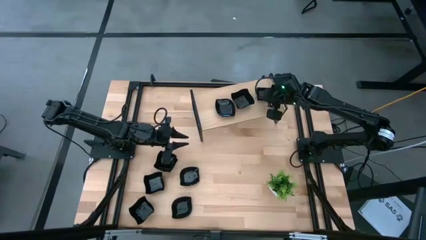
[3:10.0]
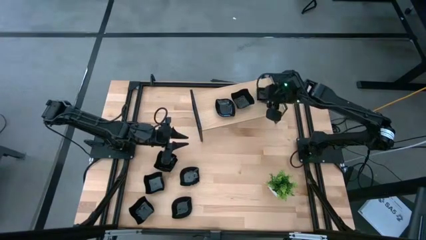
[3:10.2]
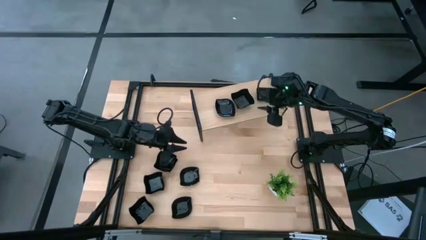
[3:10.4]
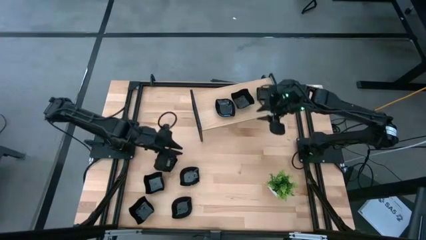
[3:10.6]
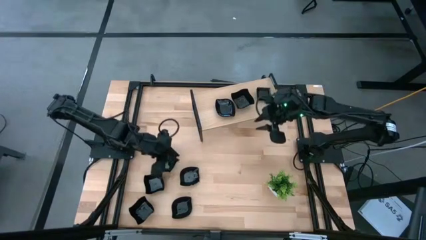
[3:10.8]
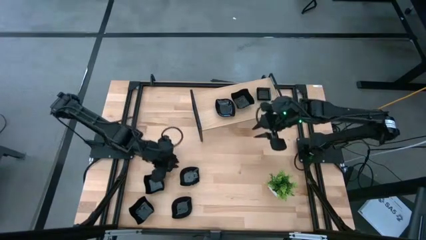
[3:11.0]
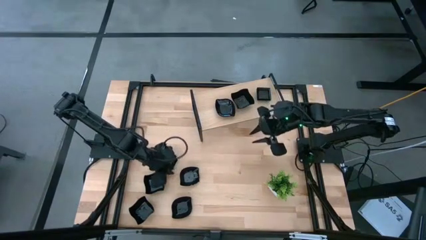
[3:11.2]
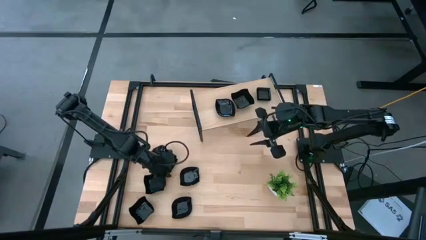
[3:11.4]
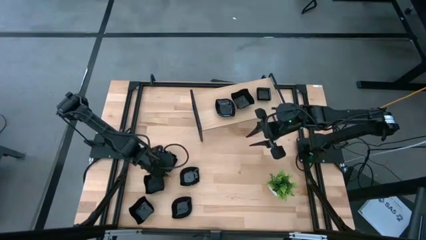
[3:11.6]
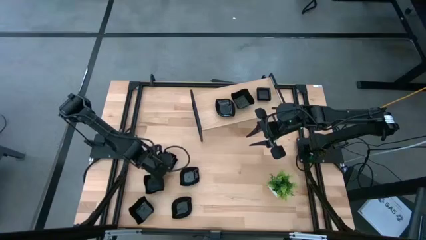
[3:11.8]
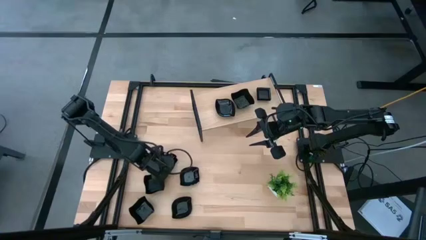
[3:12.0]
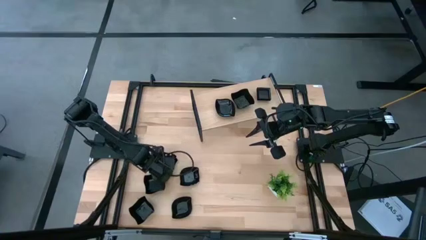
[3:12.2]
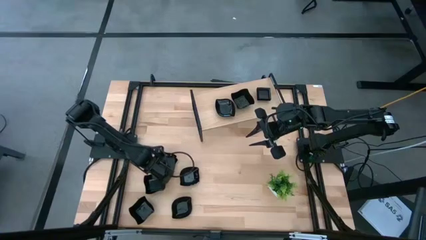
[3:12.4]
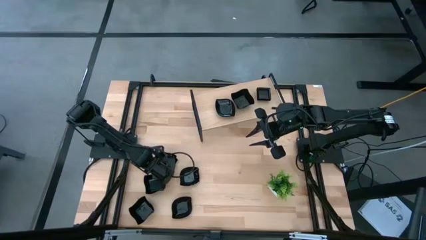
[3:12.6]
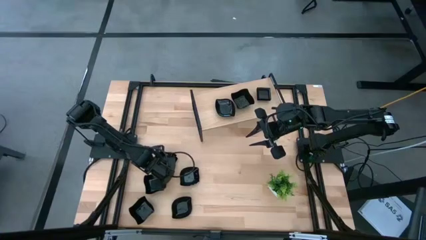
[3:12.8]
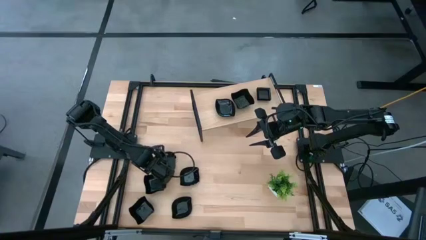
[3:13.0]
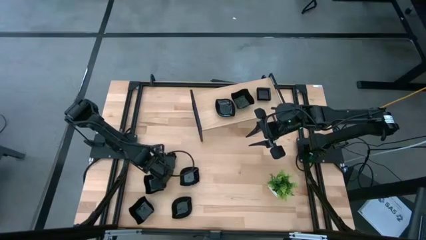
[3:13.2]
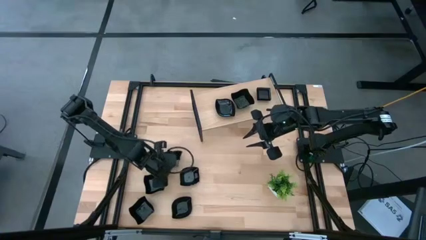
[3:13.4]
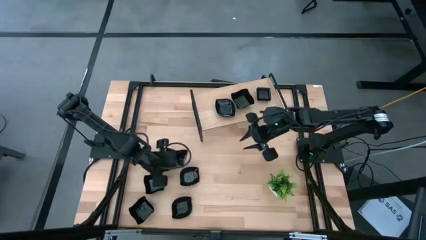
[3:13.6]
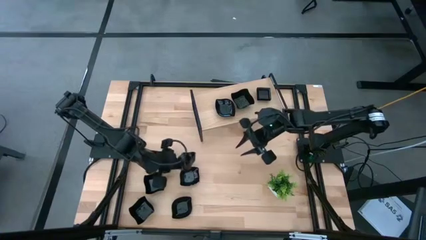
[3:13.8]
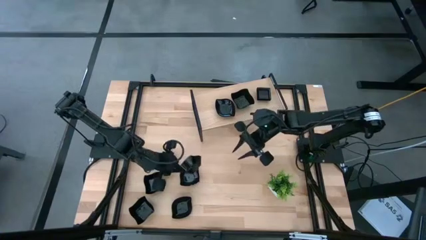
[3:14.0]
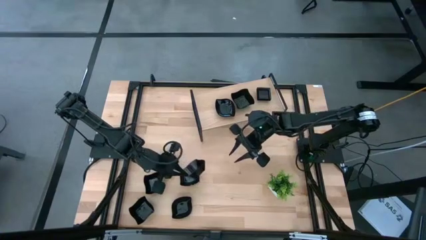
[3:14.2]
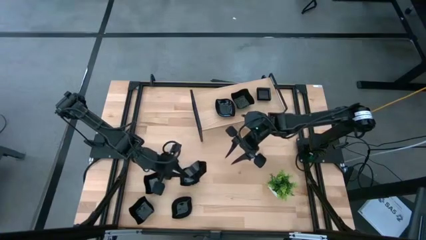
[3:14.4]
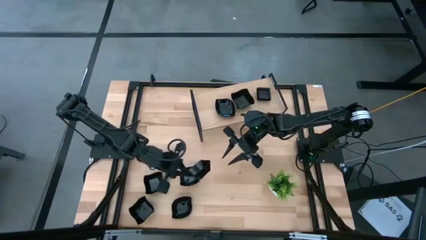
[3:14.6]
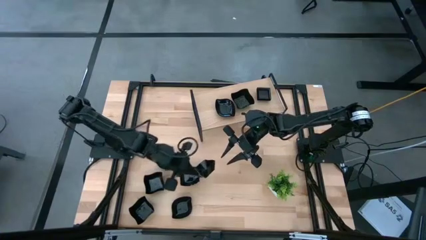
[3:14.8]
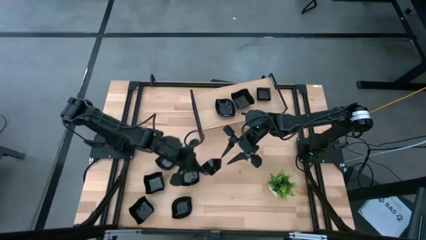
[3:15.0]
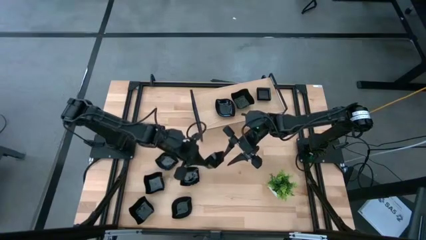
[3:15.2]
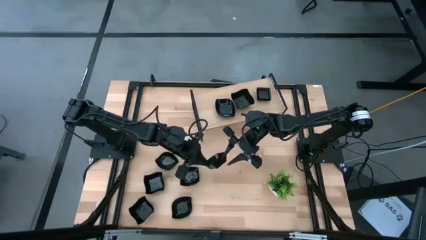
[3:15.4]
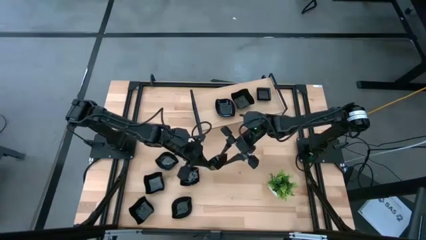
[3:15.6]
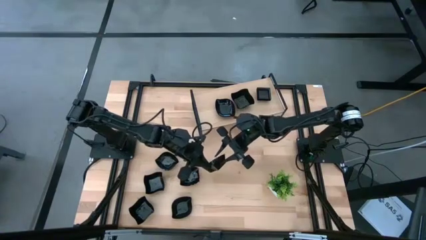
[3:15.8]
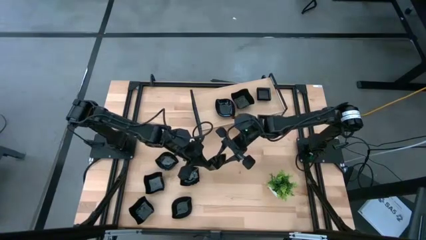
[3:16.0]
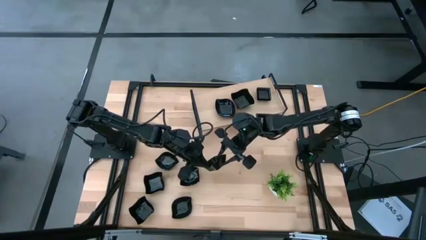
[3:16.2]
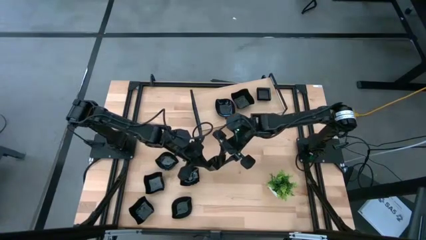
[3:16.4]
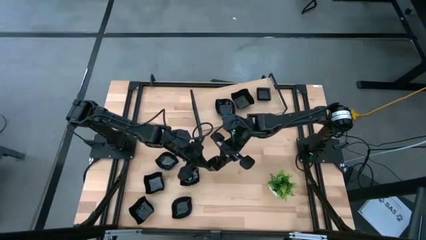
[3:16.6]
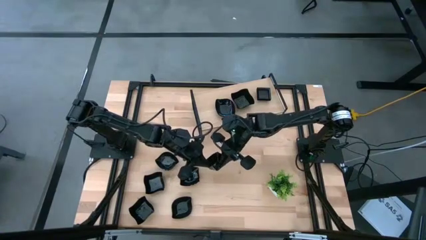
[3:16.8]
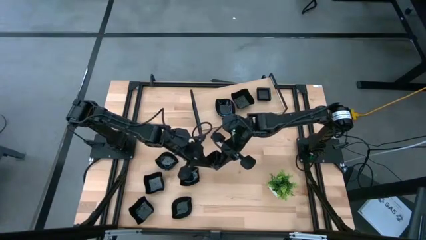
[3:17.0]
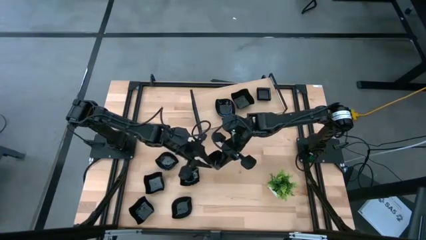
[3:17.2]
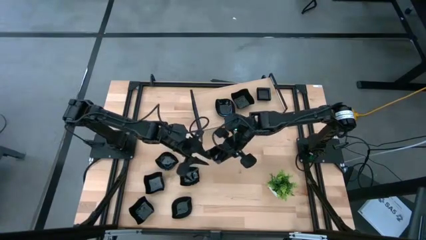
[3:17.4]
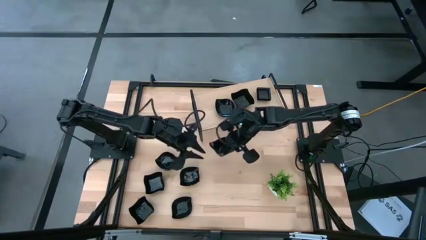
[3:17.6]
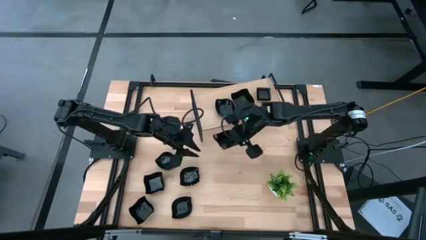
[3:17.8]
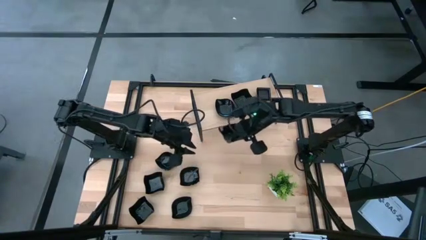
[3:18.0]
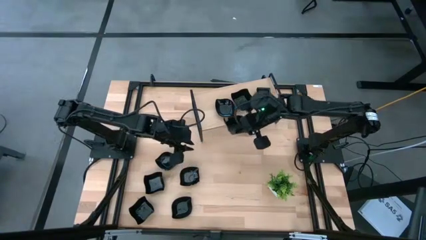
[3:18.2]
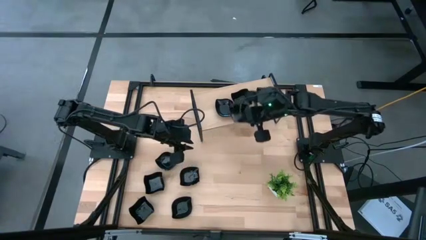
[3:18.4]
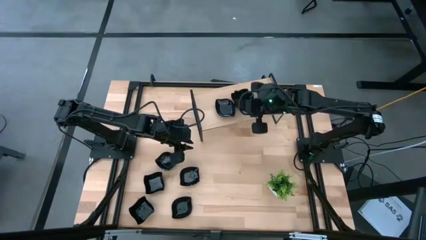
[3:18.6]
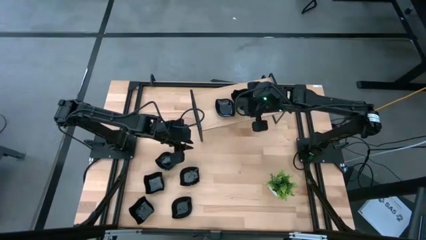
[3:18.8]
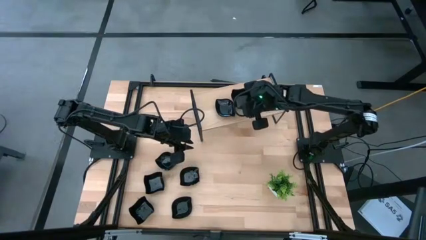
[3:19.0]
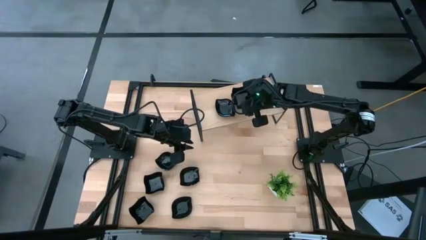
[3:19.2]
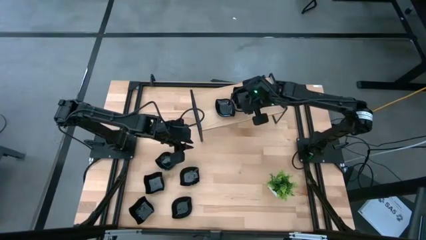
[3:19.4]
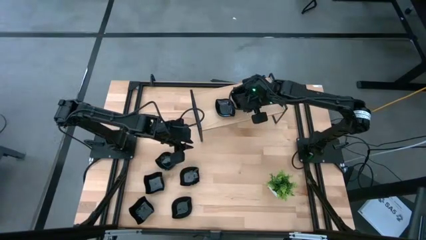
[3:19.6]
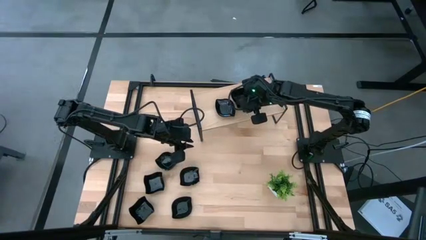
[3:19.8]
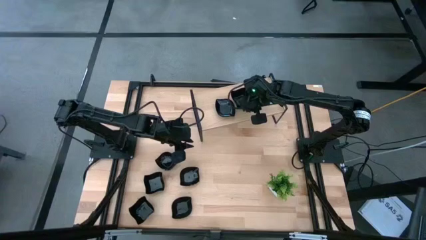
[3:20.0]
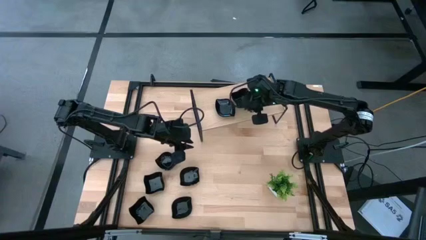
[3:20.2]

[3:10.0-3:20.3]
Task: Pick & Place Mini shaped plates
Stack the distorted square plate on top of the distorted square plate on the shelf

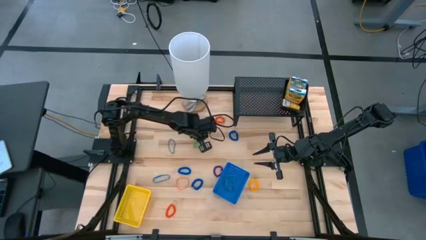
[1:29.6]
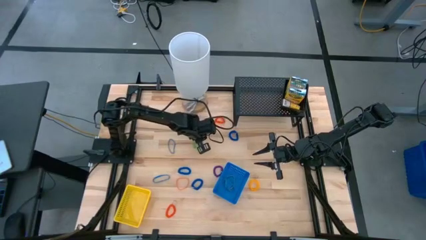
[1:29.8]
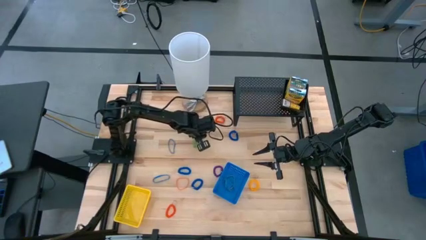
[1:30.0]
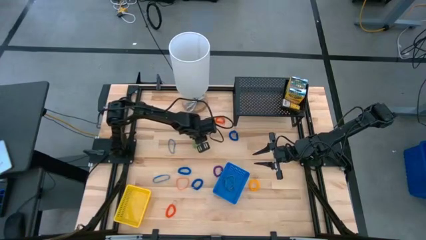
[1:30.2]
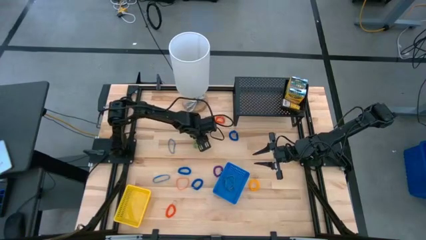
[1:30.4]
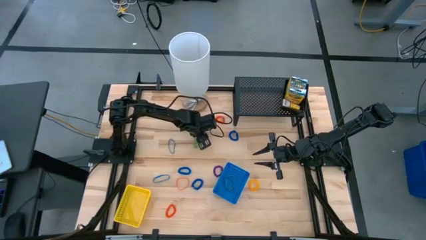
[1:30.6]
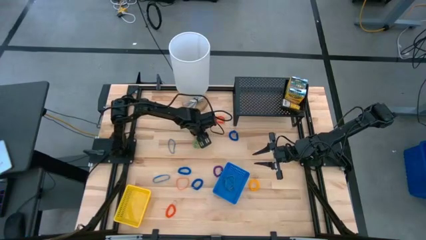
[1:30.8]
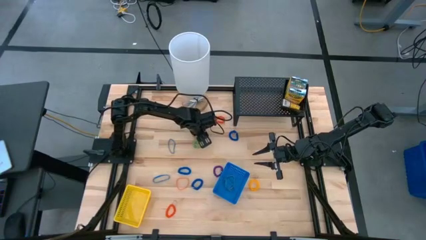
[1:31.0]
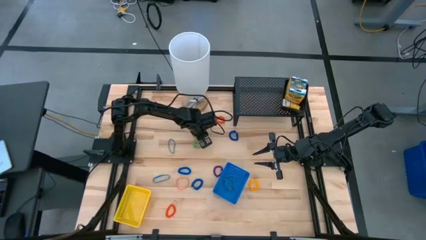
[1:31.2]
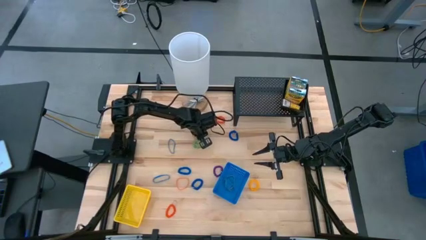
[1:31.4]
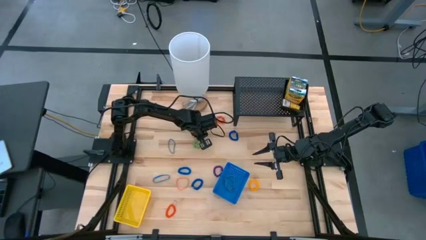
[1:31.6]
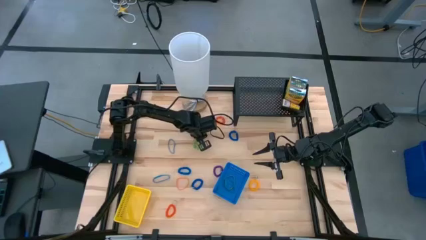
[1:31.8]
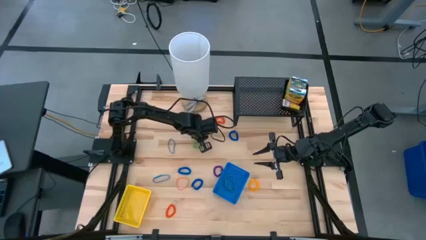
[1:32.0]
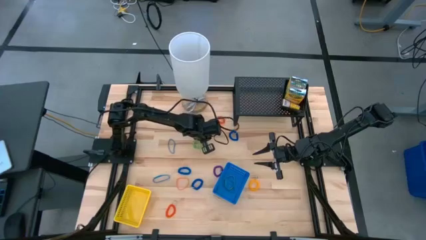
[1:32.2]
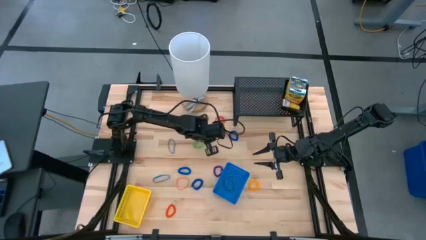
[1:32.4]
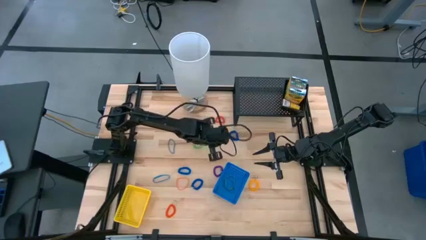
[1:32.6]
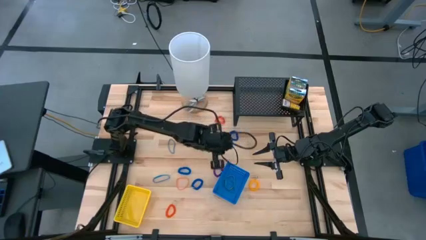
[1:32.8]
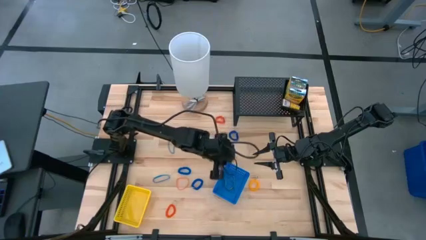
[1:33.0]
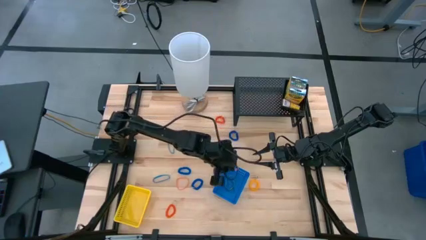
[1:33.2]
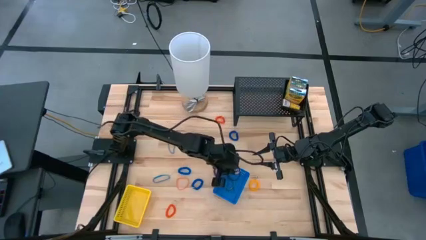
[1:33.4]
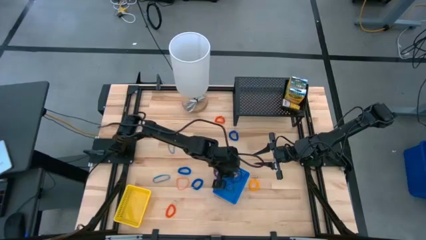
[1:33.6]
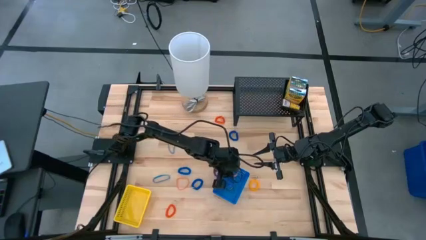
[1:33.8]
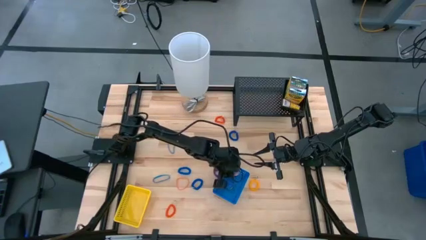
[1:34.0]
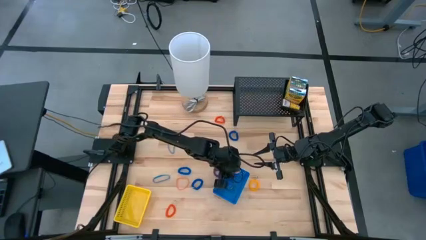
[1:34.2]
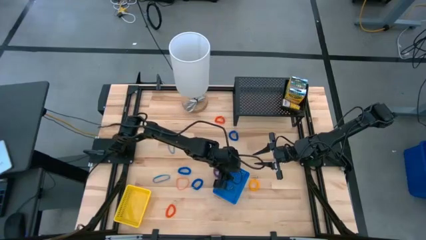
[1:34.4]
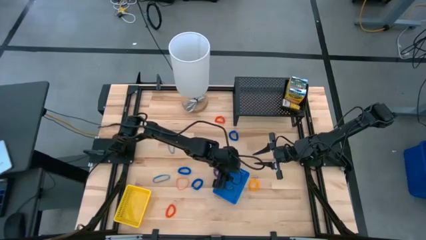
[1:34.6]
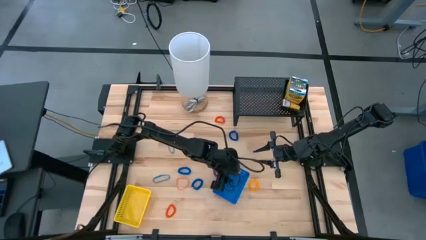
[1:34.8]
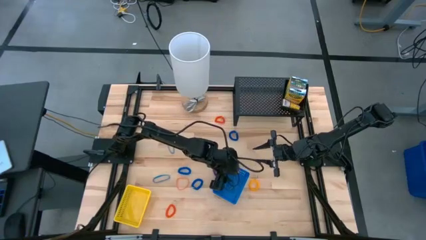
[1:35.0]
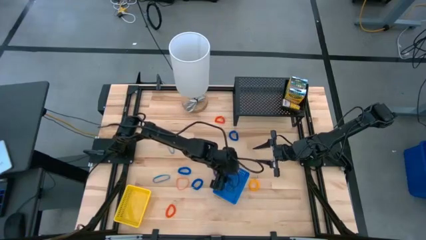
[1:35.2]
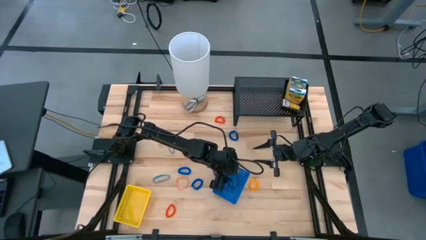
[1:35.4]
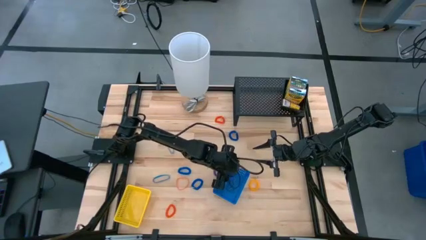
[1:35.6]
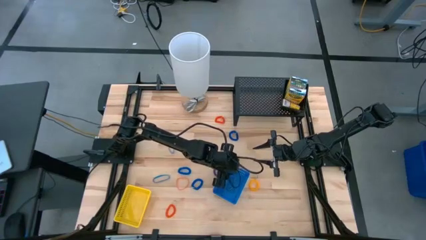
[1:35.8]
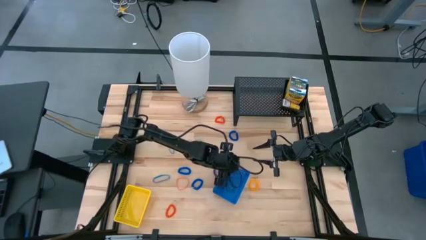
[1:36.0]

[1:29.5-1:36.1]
Task: Pick & Place Office Desk Supplies
Put the orange rubber band into the blue bin
